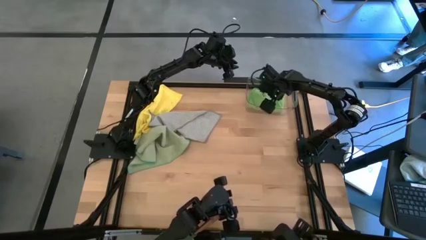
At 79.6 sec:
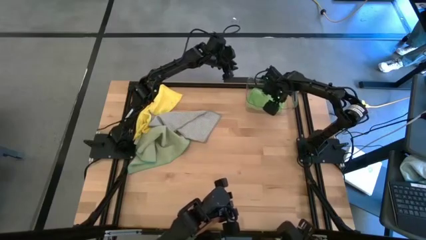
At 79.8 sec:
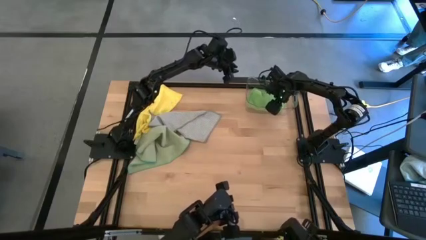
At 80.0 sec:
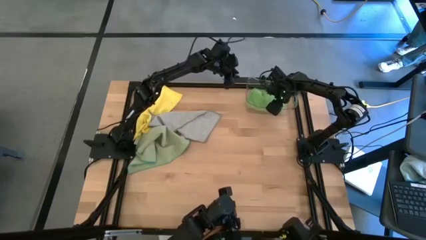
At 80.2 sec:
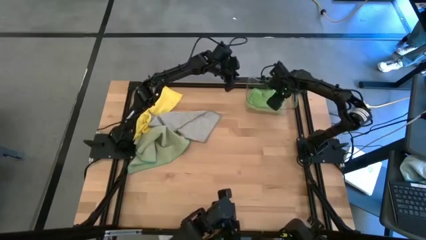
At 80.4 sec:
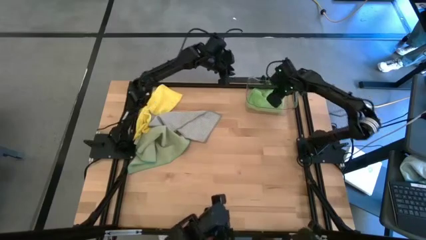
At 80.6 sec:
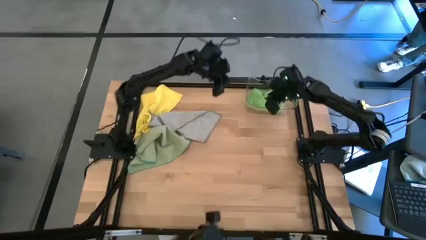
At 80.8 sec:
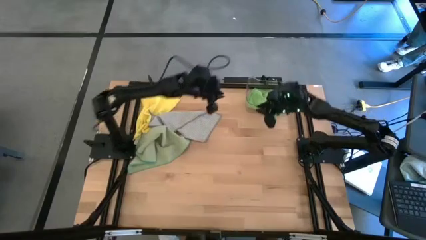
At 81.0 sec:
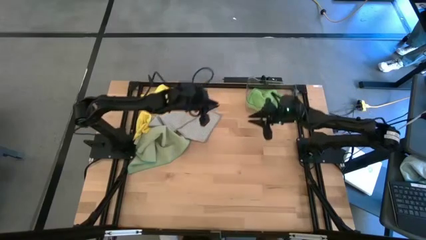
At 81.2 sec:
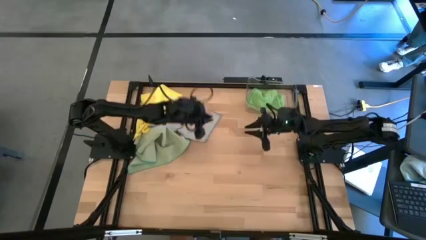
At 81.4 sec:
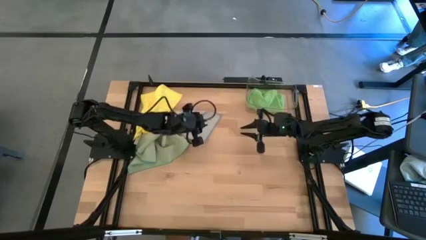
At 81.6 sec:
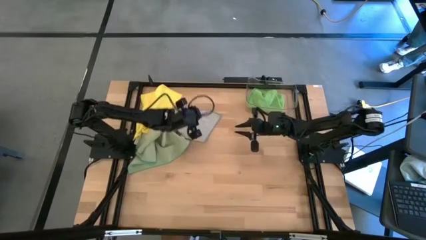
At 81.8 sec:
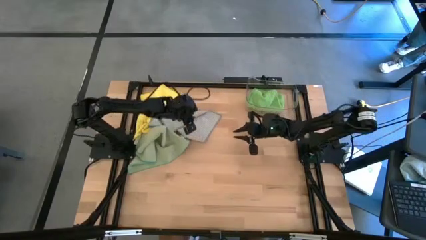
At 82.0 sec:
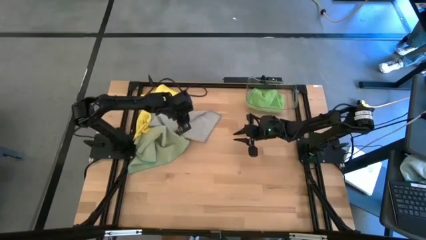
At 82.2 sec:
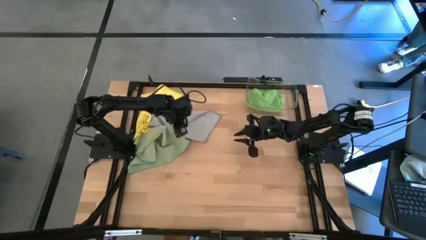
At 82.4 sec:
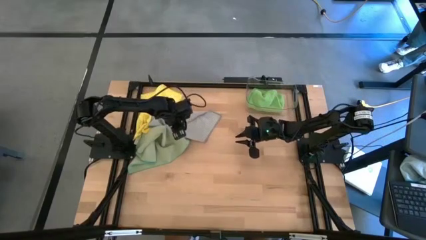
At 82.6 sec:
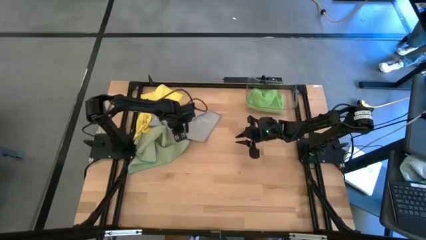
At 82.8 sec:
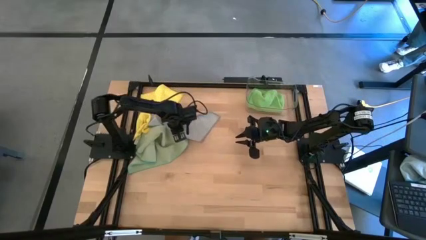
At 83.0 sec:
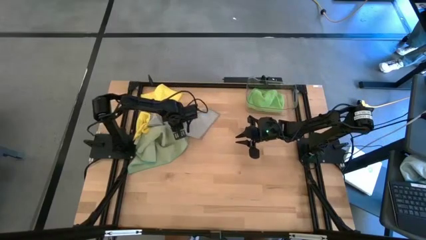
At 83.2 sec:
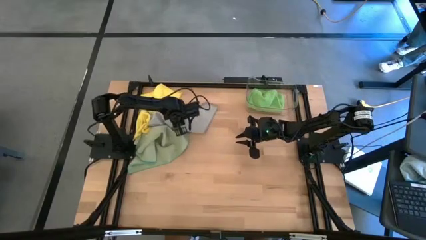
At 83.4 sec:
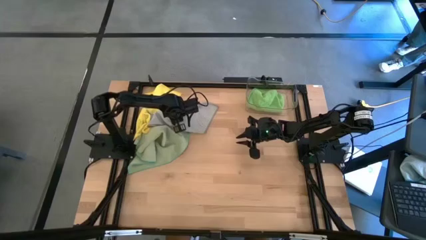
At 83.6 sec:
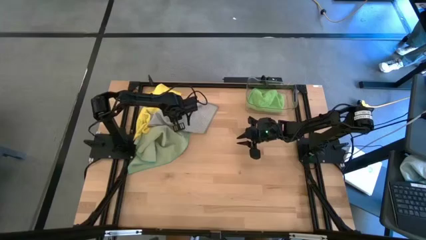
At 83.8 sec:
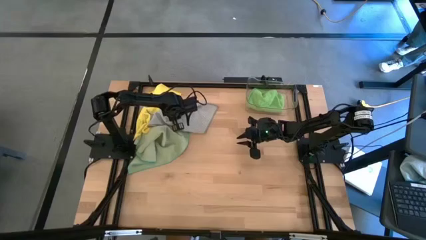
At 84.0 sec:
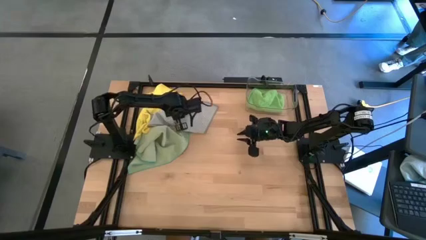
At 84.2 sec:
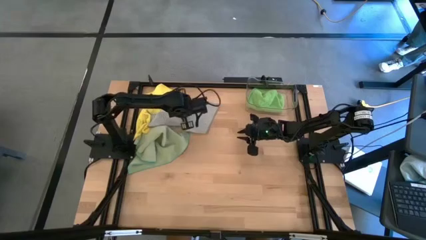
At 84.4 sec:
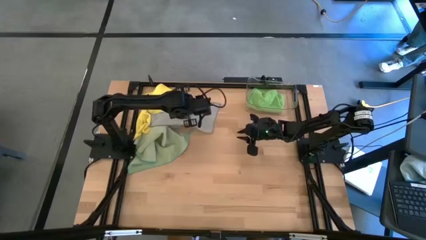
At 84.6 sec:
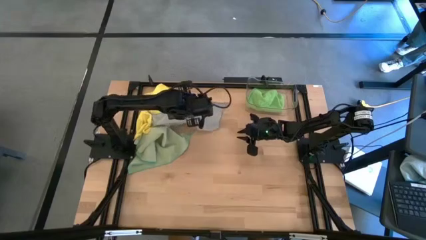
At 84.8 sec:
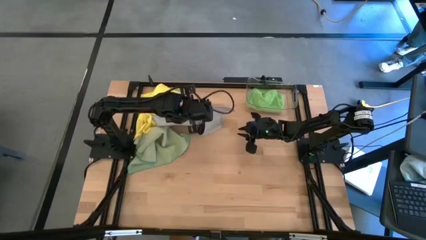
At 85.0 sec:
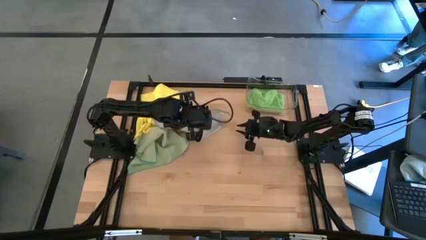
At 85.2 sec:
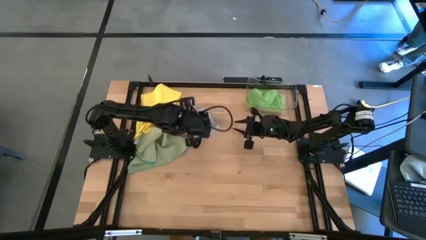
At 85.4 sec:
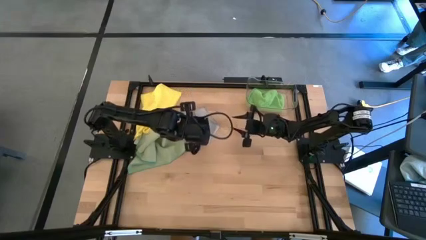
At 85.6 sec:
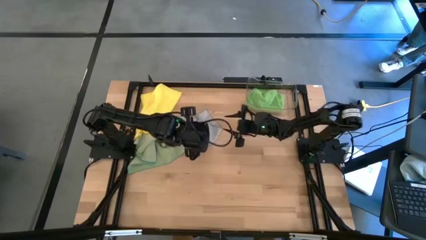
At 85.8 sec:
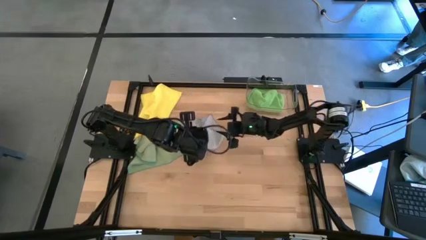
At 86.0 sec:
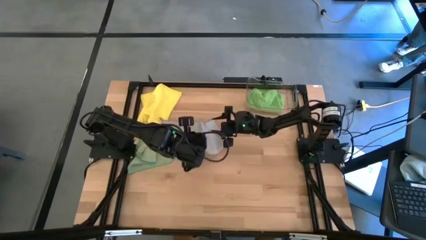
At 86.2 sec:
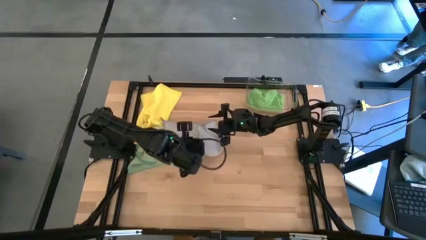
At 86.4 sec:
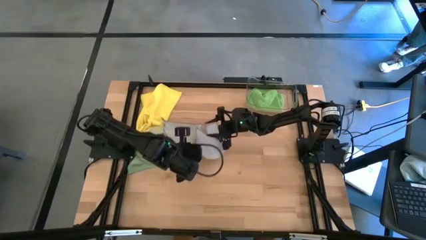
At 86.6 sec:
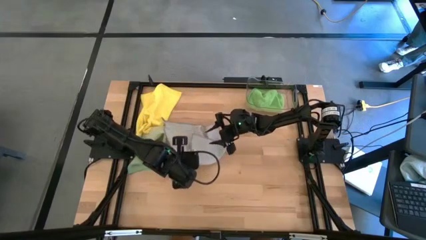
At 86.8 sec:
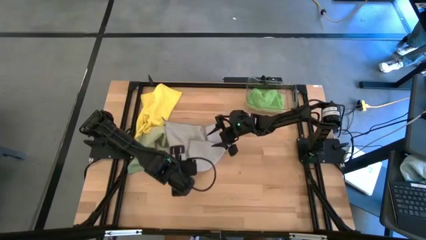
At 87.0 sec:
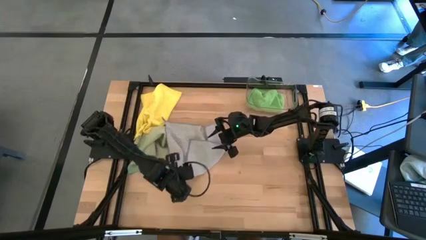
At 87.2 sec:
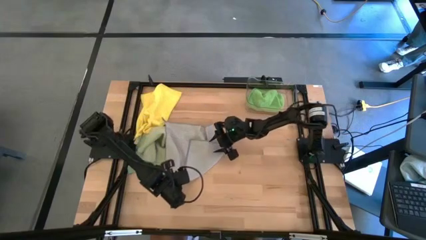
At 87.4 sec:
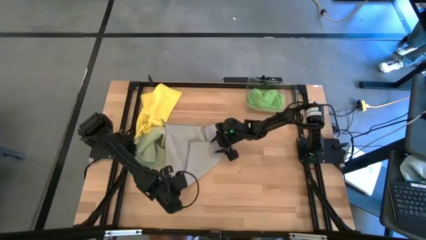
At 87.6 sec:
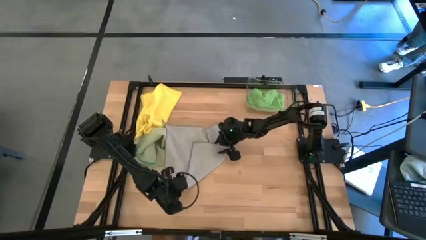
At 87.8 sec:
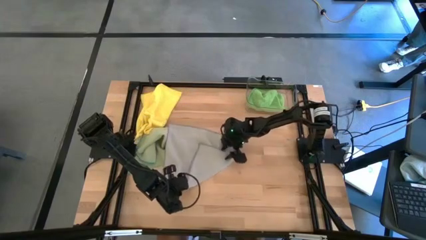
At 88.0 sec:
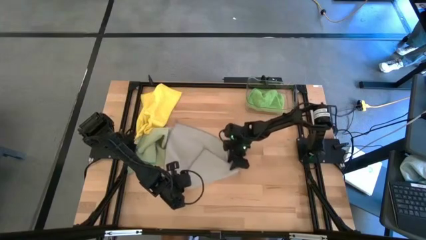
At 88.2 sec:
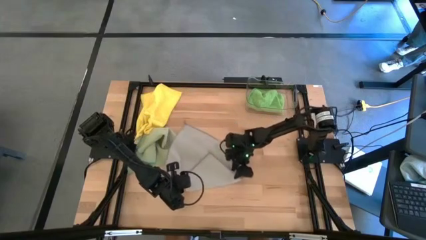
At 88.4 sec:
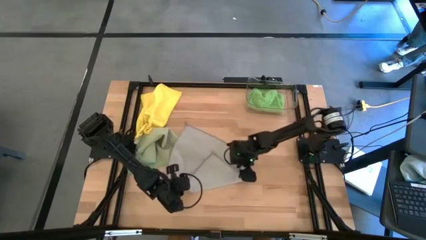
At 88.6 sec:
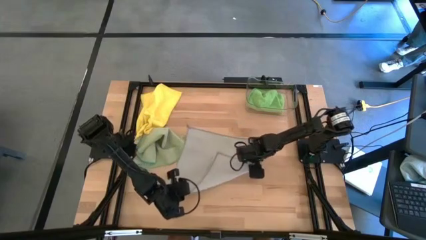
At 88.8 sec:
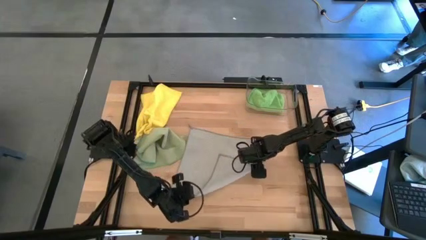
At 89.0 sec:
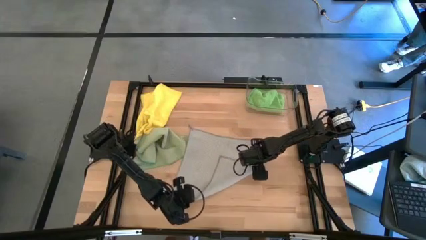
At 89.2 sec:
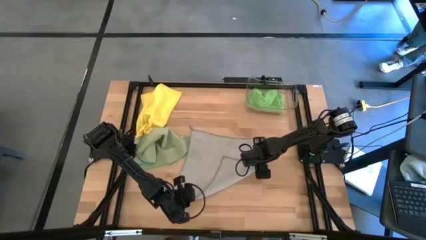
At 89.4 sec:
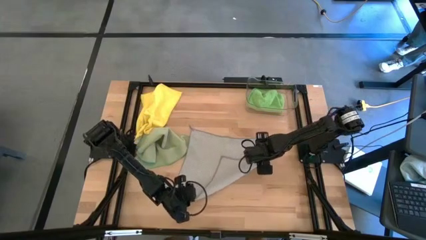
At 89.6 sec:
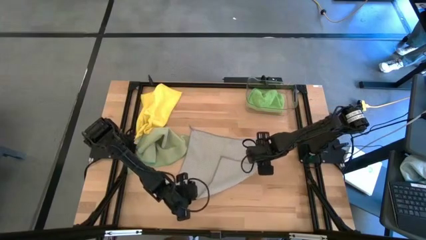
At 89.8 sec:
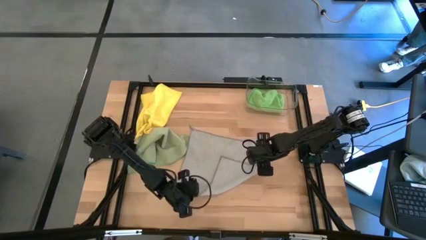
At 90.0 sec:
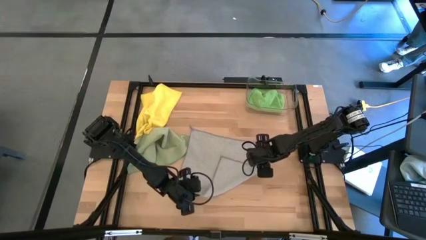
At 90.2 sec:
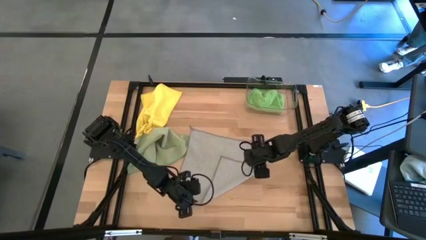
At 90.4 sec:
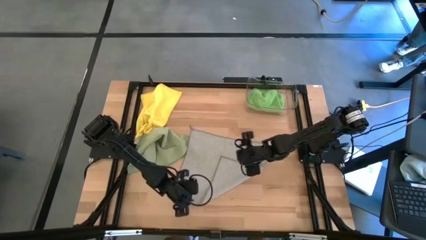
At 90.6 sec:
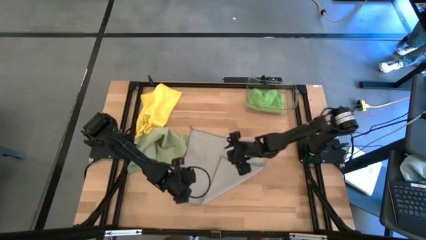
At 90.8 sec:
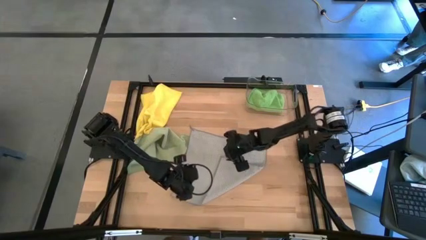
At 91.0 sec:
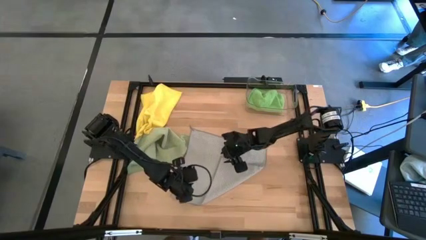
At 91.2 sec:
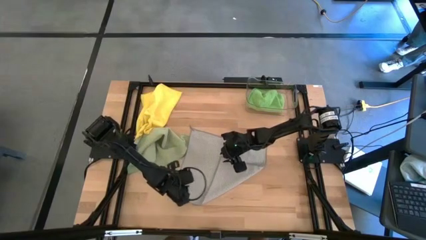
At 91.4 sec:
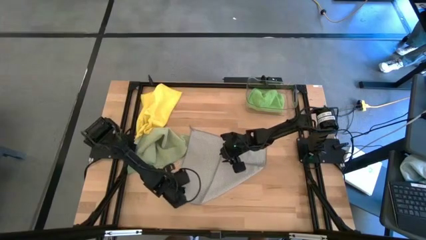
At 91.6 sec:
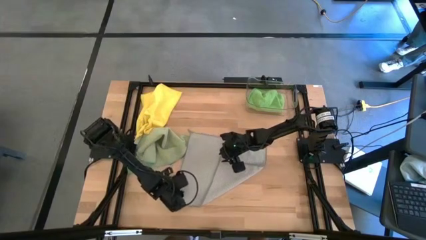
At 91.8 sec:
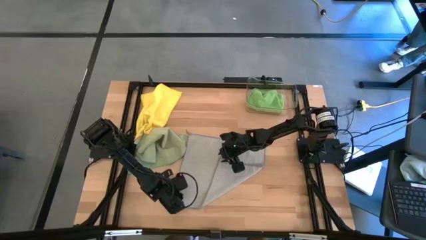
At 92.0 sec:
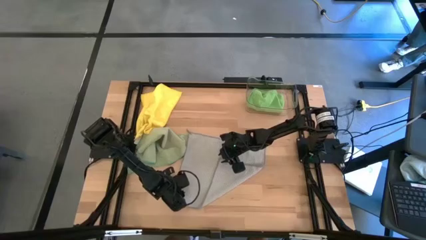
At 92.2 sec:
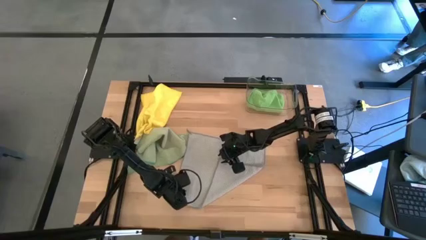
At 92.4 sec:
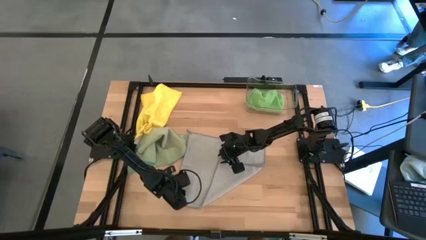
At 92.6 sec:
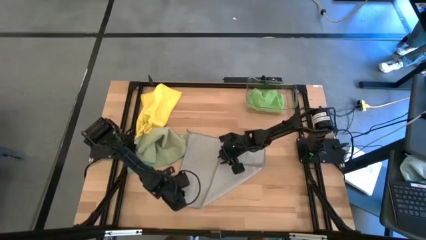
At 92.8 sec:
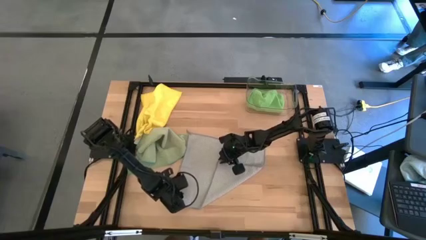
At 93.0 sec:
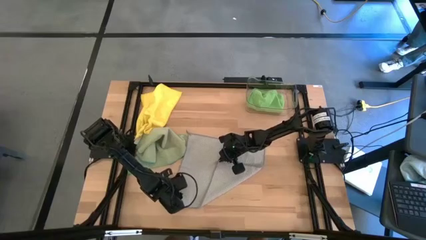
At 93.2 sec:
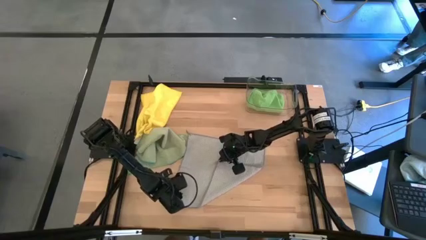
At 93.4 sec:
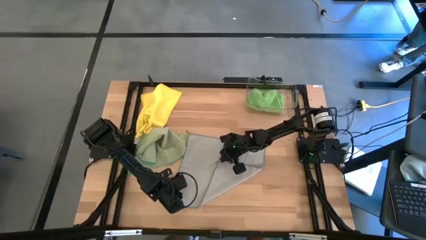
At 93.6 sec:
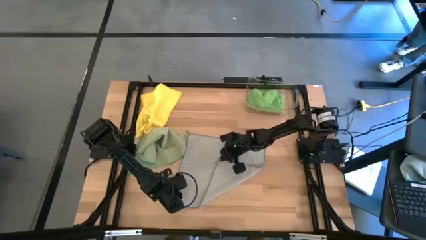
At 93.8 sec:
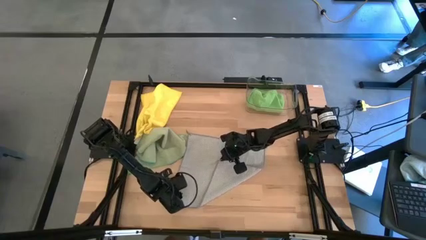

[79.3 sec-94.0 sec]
Task: Fold microfiber towels
Fold the gray cloth
